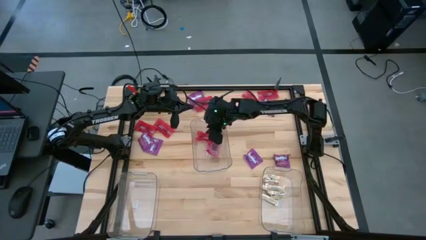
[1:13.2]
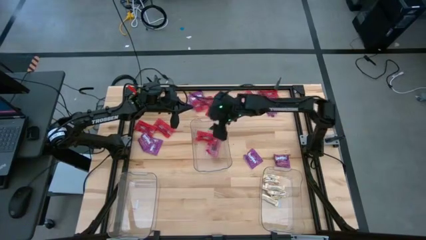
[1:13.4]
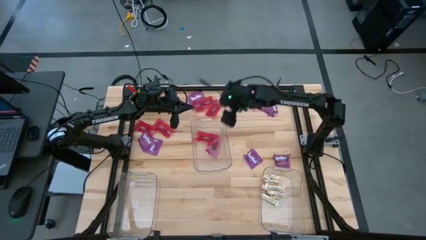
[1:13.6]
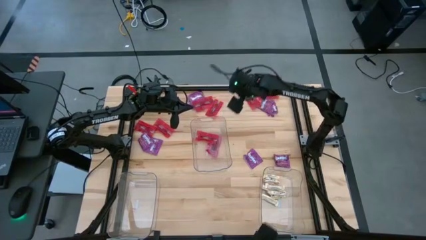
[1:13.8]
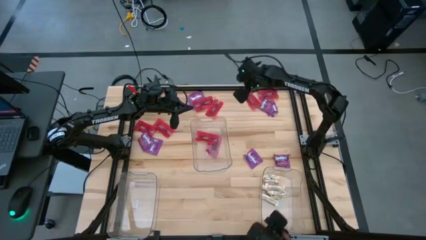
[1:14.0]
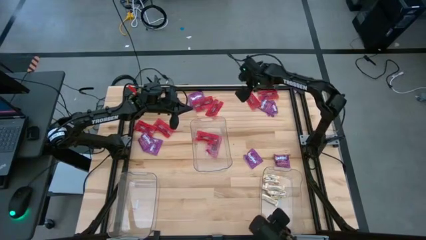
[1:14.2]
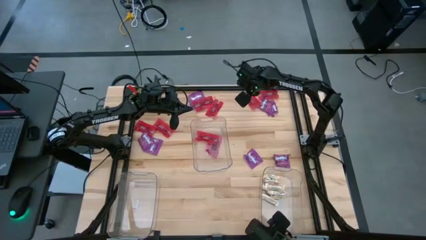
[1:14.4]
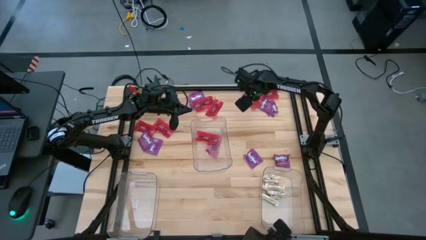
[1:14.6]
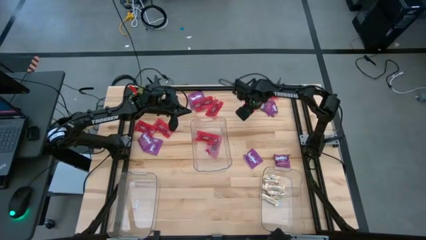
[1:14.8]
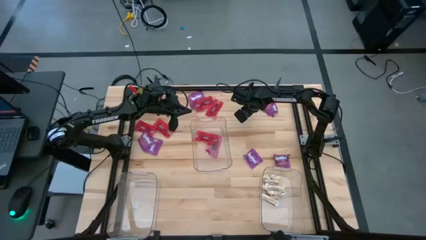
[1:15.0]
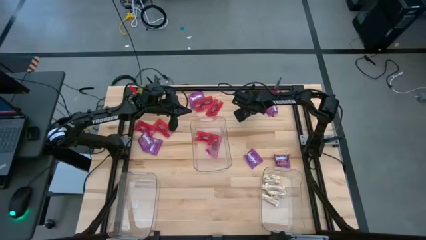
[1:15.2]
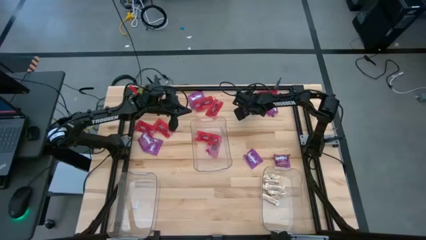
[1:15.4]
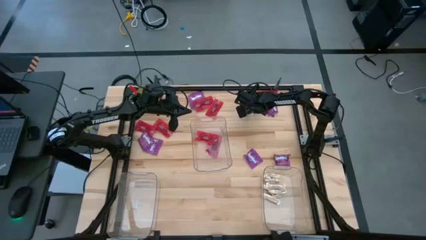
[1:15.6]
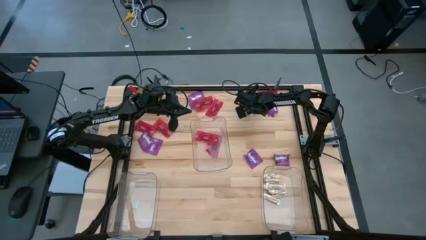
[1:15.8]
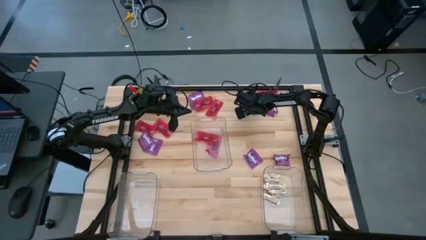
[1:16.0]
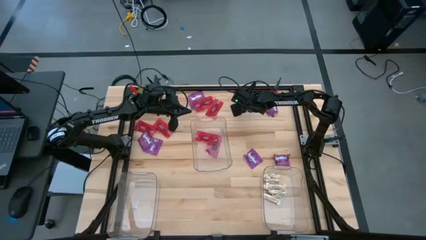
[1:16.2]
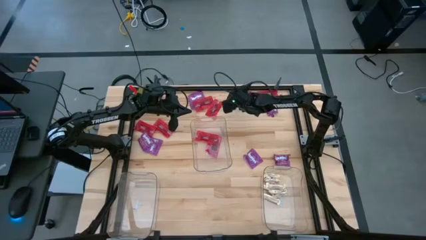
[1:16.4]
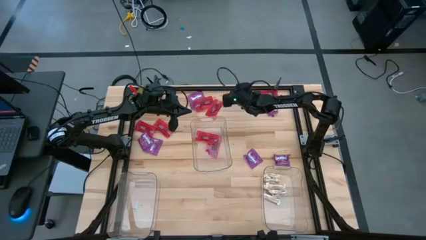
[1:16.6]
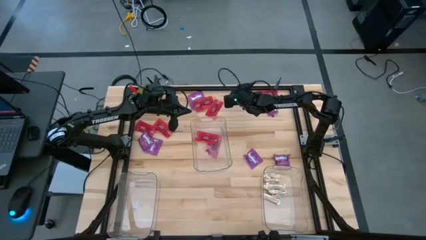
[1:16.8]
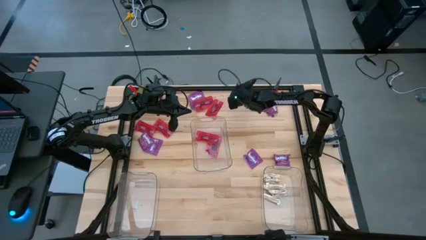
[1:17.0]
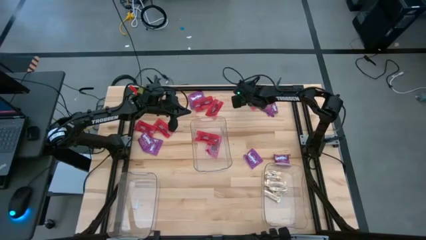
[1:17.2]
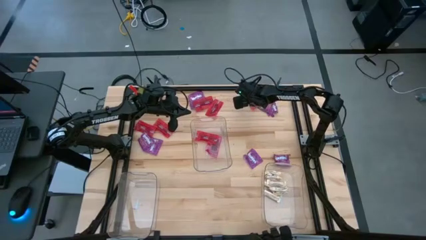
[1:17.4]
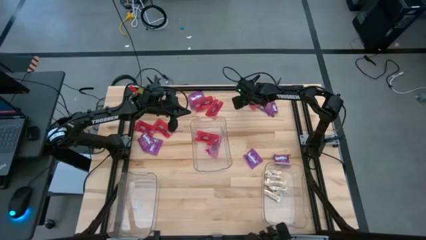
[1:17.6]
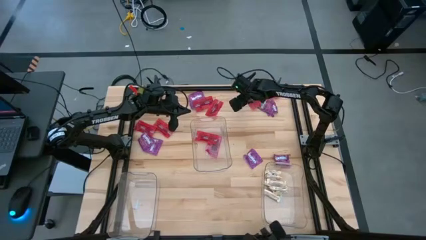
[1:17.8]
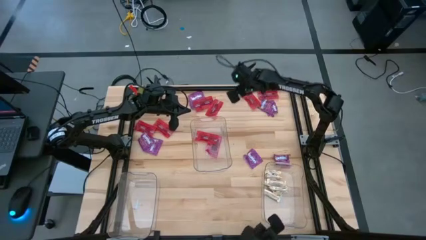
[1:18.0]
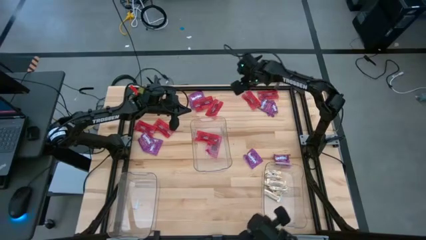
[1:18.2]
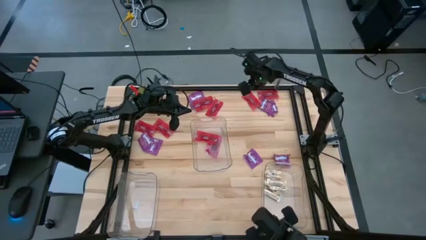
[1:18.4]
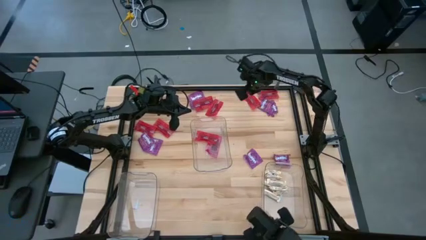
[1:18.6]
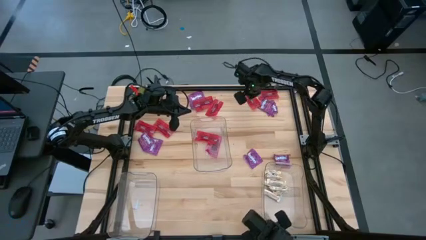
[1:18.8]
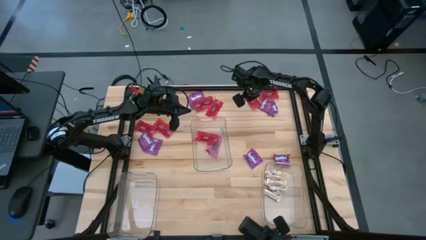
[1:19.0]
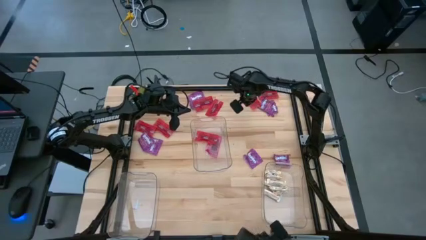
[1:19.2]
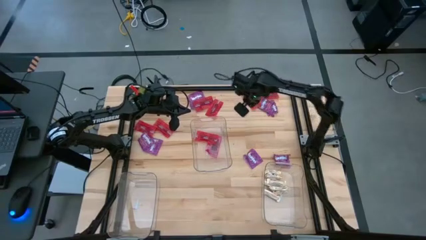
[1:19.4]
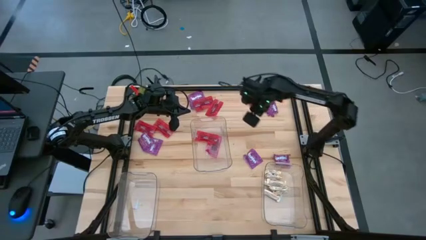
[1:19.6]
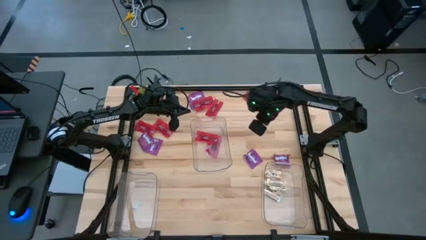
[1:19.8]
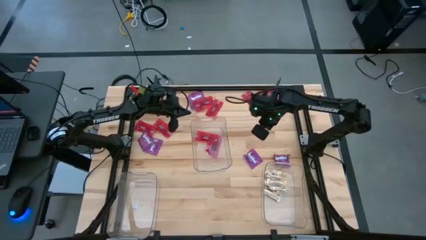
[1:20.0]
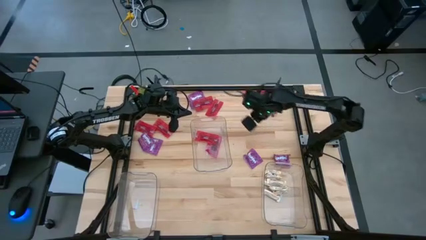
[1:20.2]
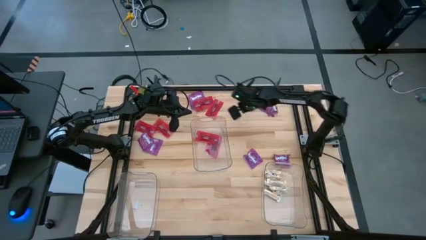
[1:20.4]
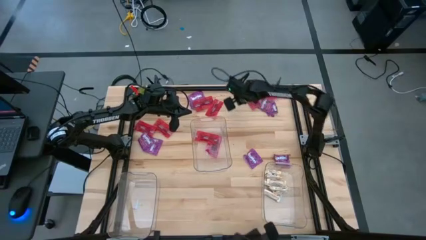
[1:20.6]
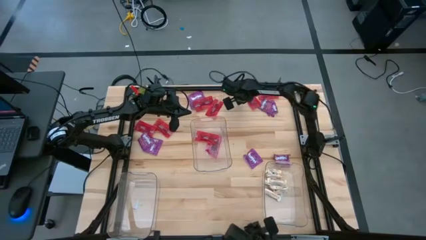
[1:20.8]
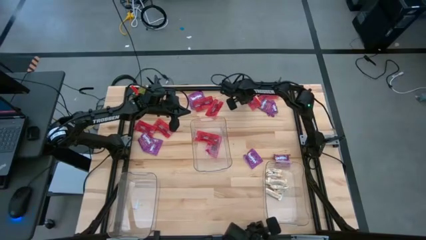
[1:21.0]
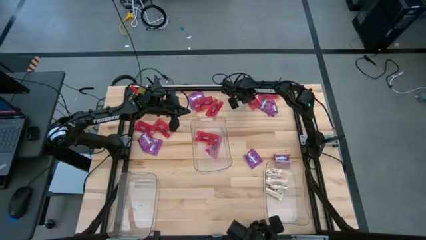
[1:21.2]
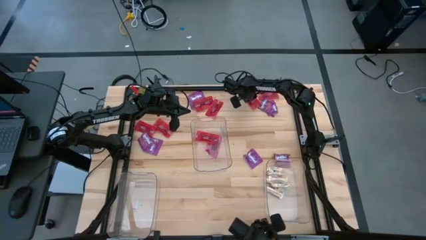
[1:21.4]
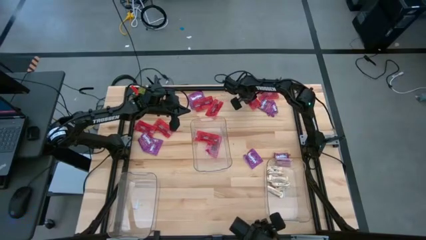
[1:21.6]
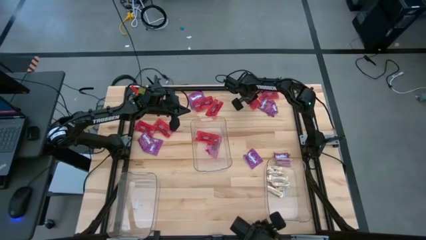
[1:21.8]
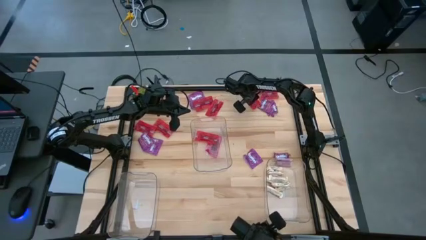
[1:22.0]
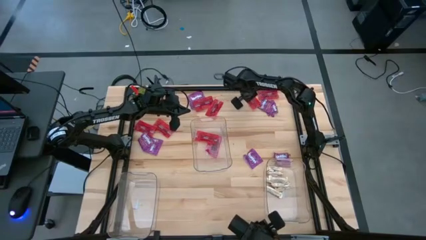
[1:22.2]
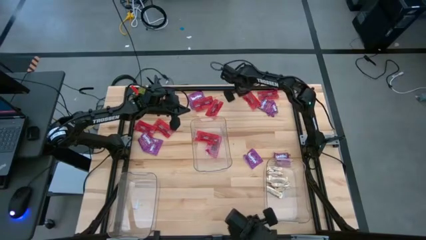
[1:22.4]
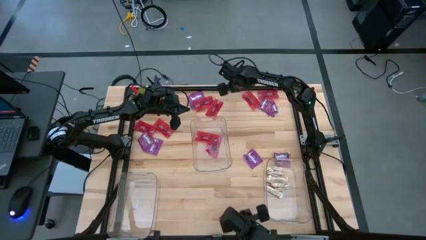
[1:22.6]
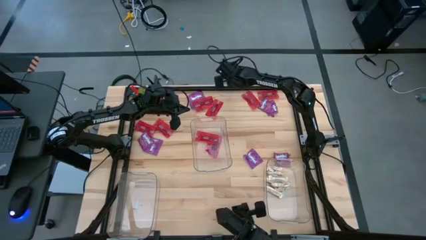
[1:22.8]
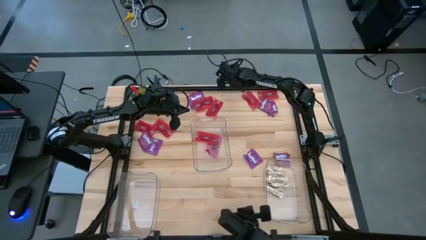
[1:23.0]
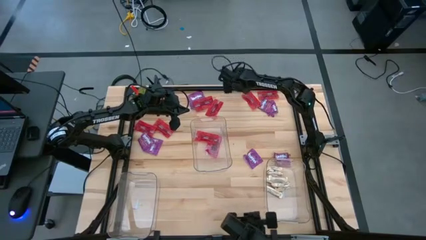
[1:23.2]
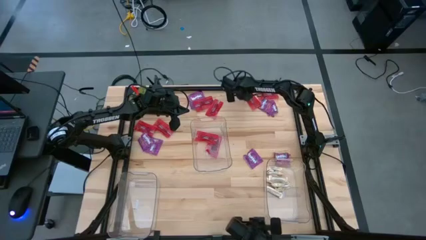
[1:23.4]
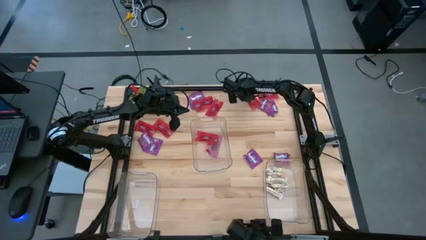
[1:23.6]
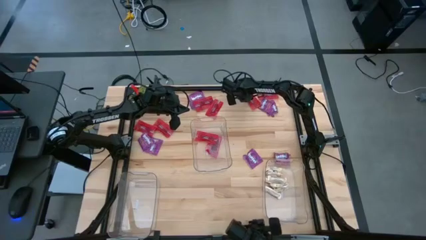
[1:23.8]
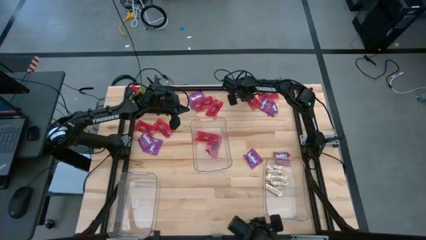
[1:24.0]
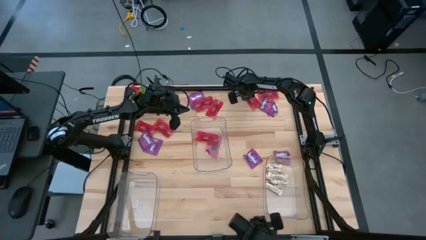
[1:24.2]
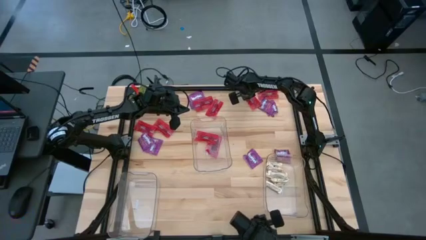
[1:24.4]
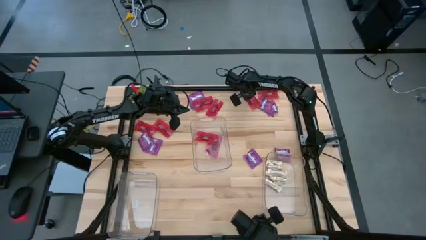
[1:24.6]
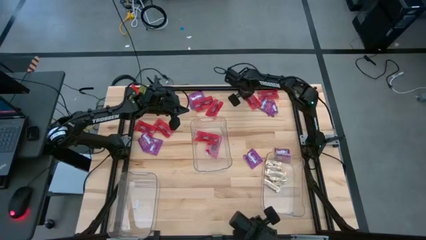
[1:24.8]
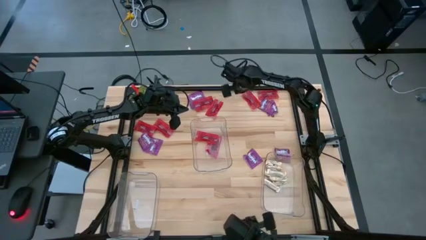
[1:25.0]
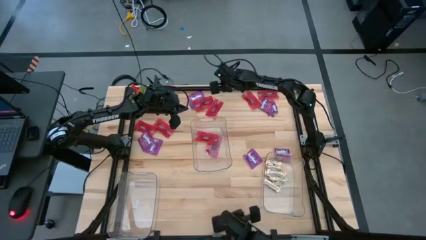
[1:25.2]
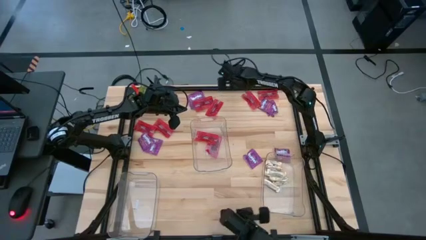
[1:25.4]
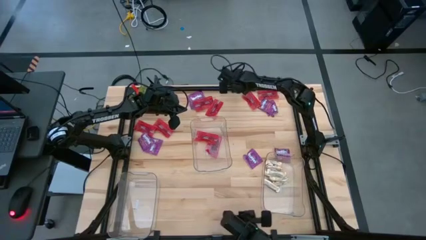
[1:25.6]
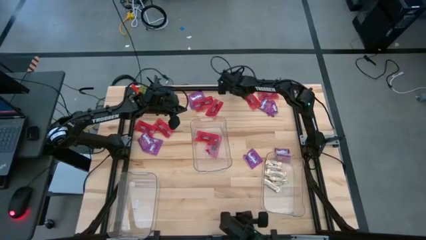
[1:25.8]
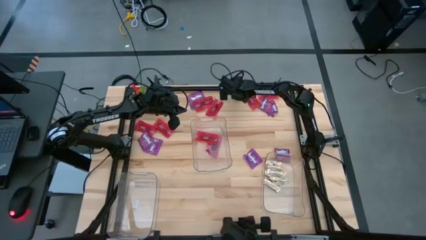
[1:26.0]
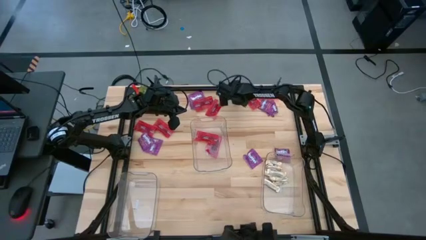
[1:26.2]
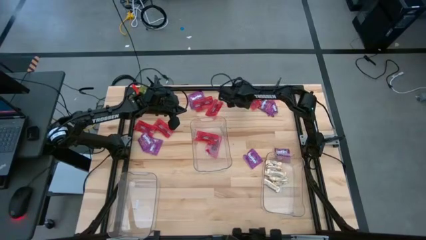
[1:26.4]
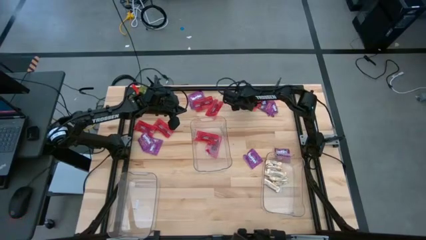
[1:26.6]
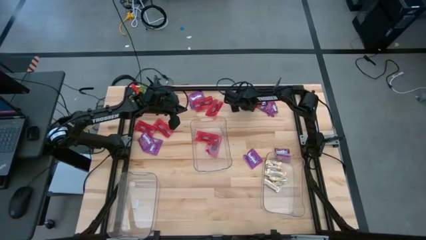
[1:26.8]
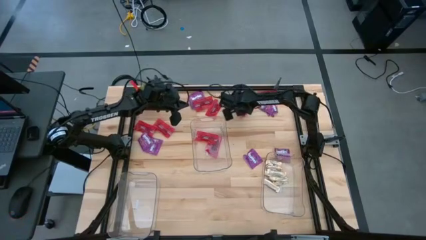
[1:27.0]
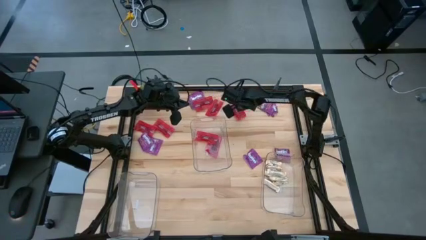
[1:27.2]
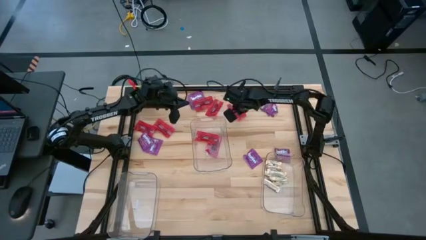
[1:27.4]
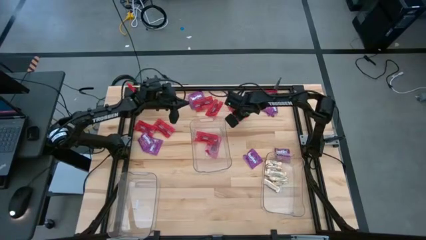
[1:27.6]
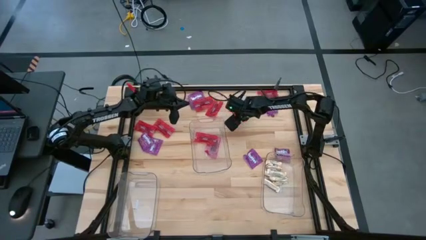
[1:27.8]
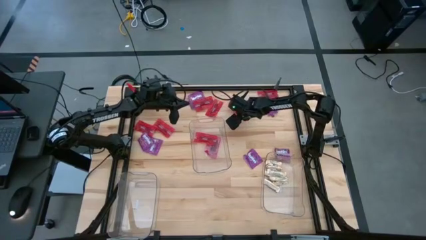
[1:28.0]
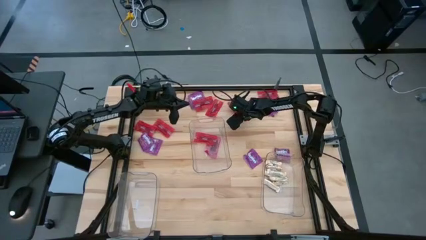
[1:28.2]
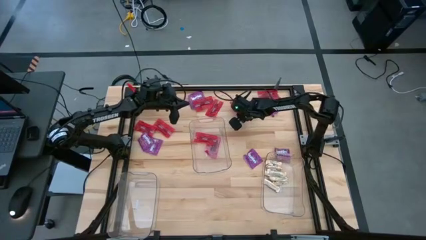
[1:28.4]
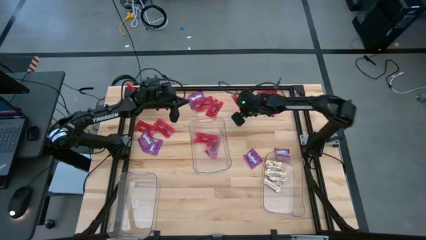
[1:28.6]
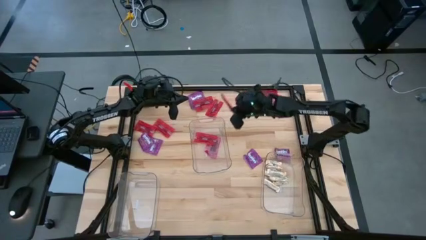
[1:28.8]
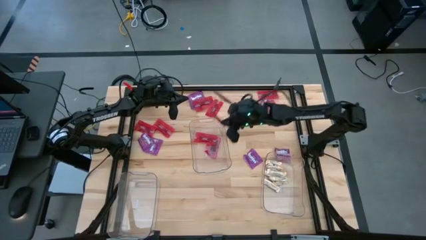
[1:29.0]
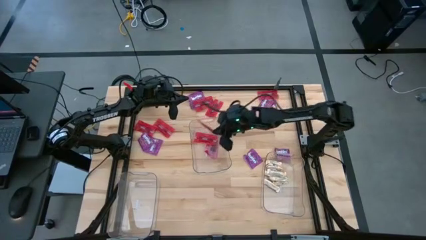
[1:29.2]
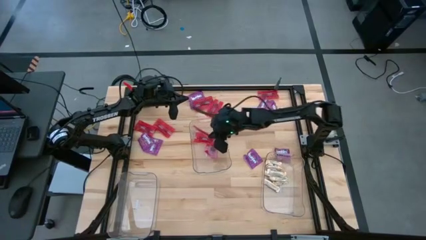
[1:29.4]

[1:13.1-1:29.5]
Task: Sort candy
Put the red candy pack into the middle transparent bin

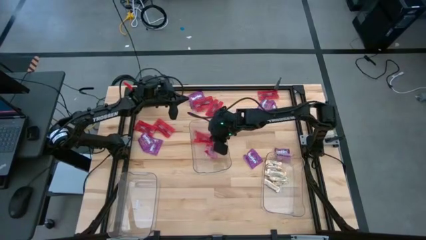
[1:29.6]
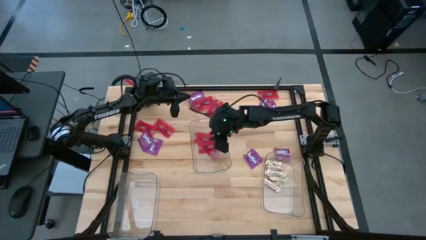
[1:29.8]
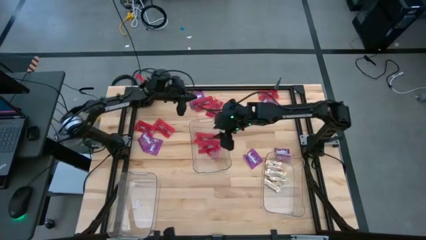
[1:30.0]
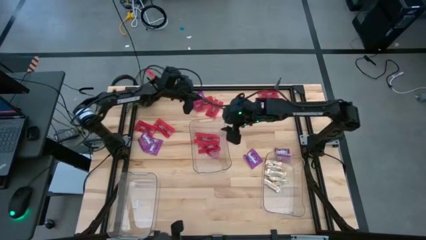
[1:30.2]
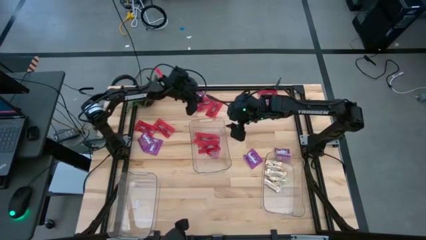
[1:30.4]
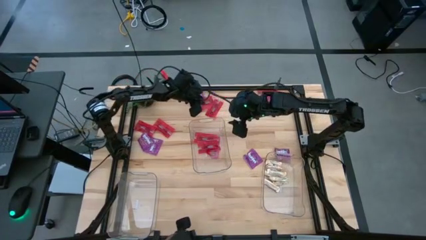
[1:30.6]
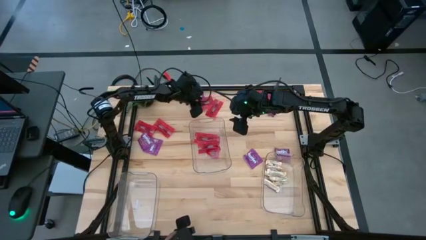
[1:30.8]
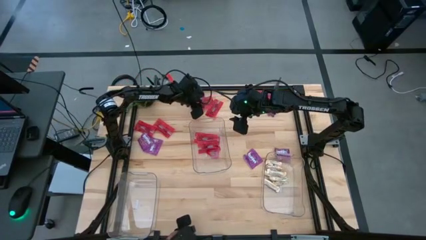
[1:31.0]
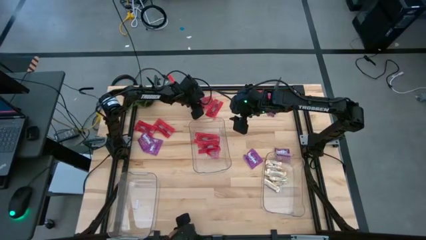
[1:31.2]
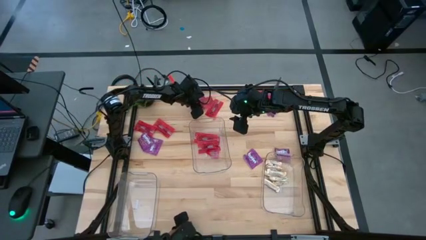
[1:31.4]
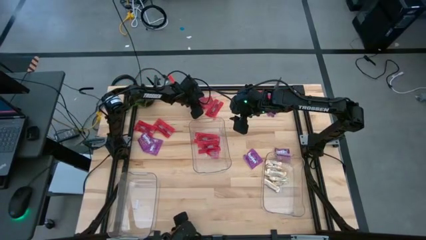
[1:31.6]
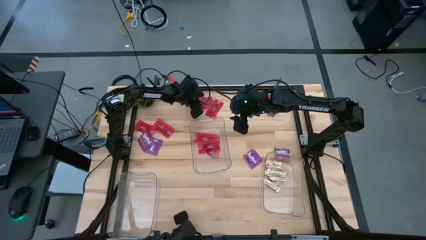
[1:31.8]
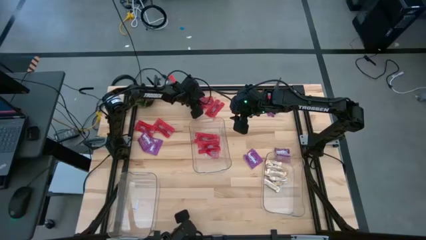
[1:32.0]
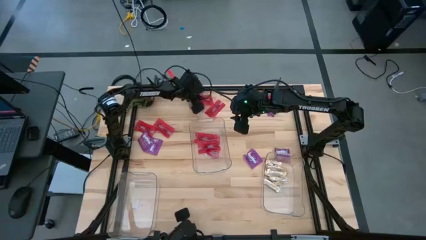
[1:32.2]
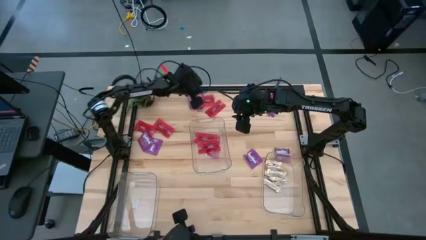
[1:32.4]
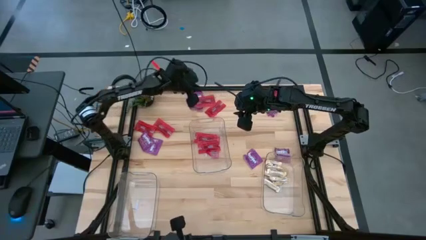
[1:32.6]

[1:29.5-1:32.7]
Put the red candy pack into the middle transparent bin
